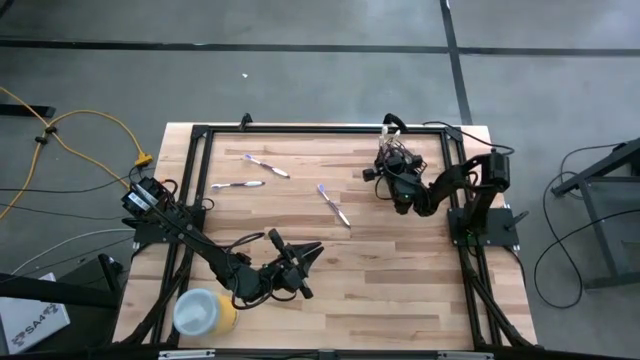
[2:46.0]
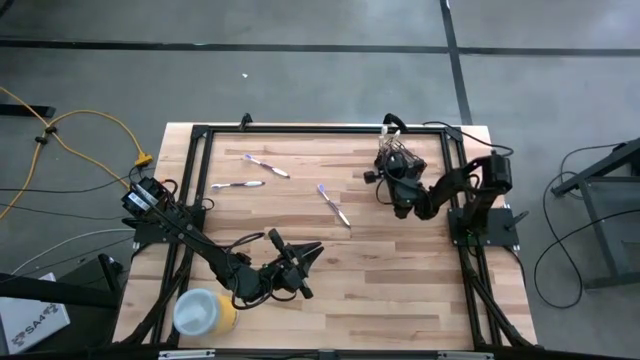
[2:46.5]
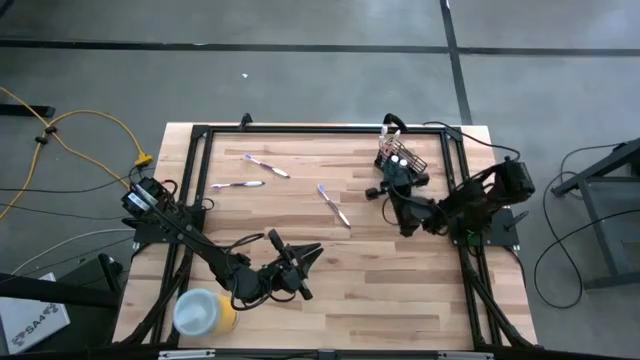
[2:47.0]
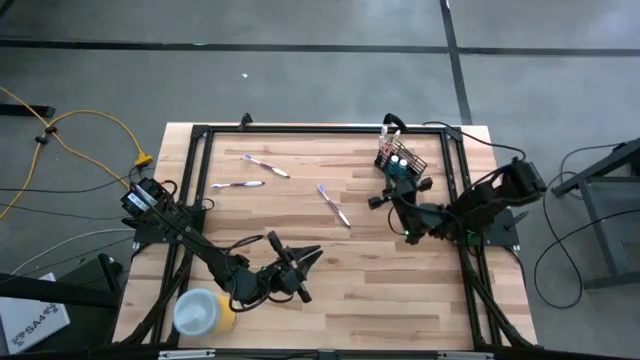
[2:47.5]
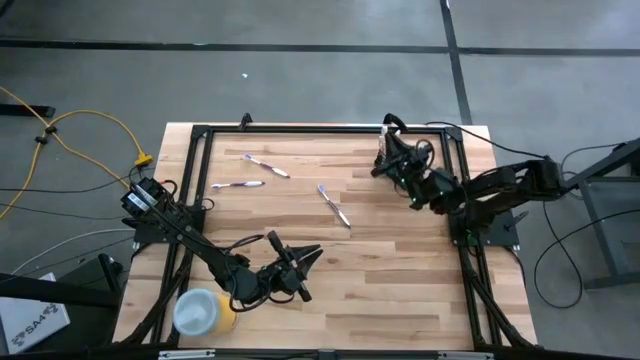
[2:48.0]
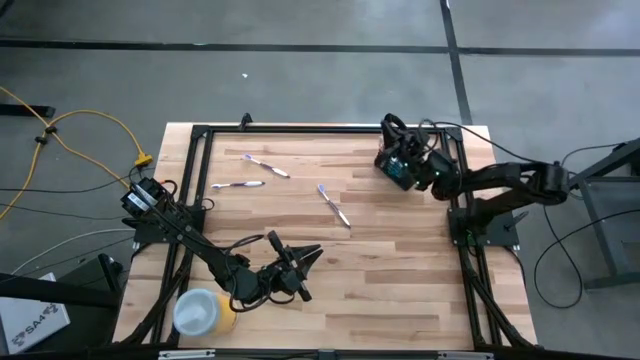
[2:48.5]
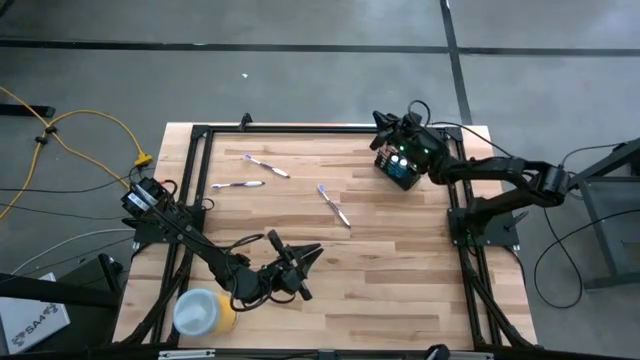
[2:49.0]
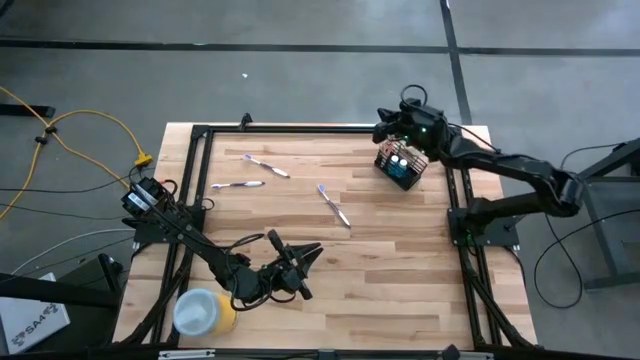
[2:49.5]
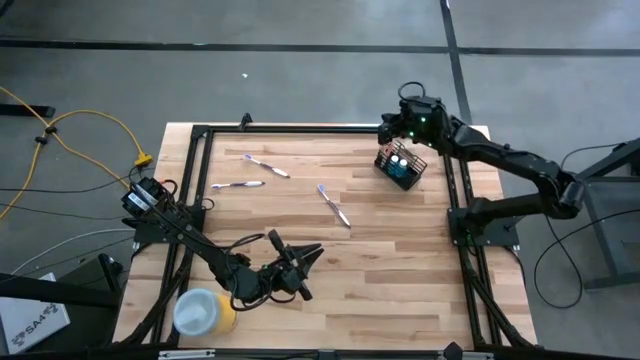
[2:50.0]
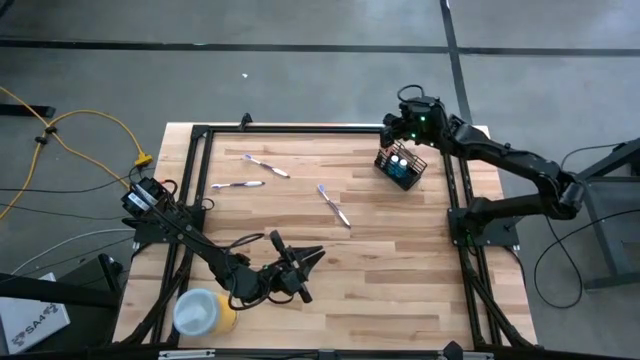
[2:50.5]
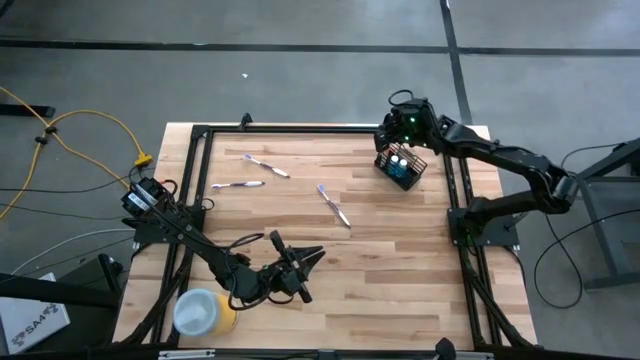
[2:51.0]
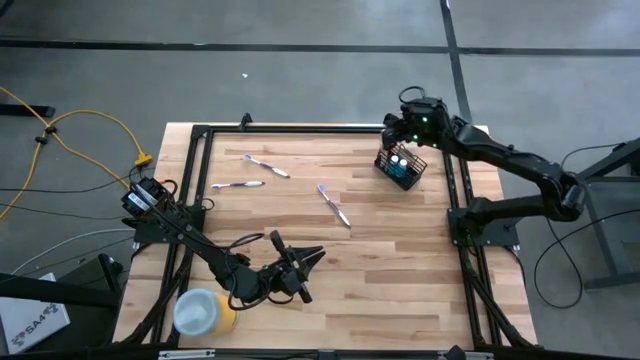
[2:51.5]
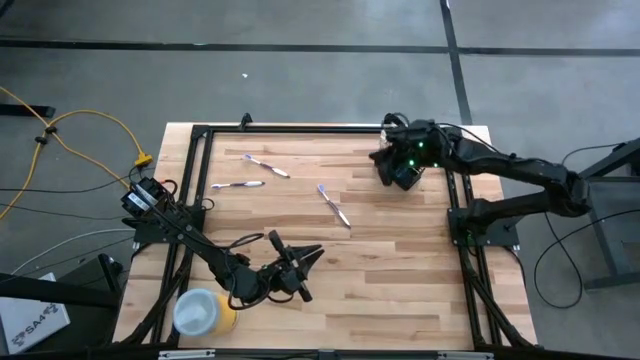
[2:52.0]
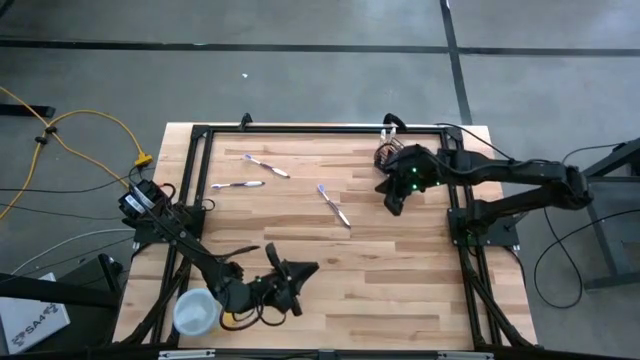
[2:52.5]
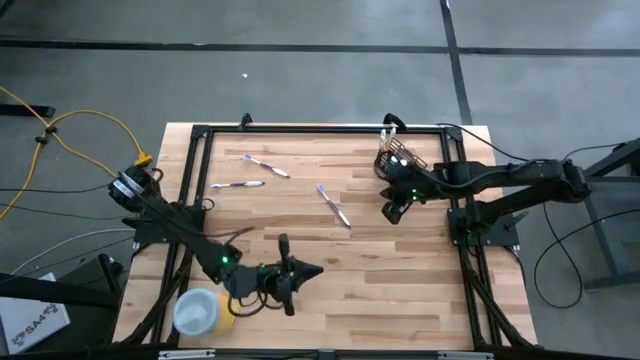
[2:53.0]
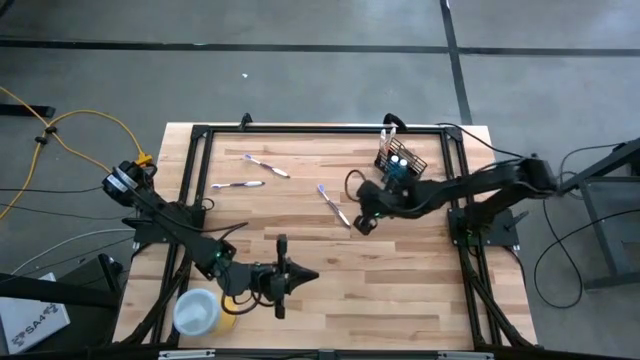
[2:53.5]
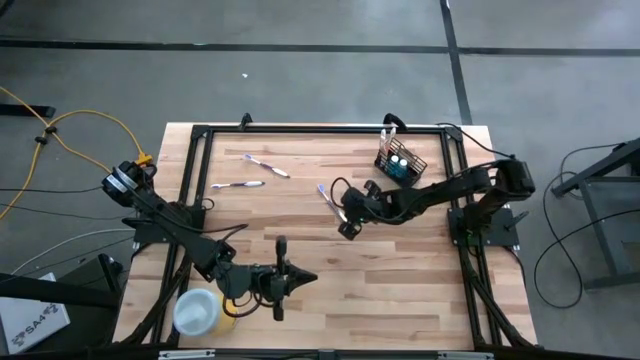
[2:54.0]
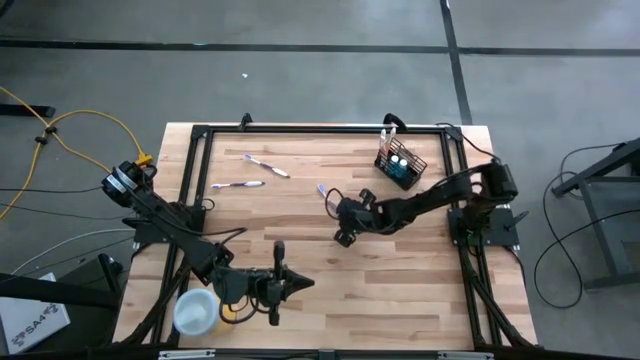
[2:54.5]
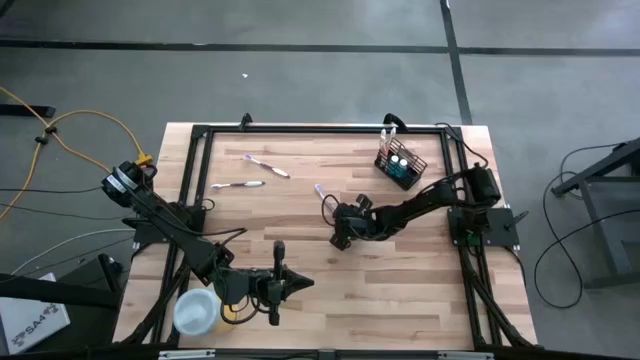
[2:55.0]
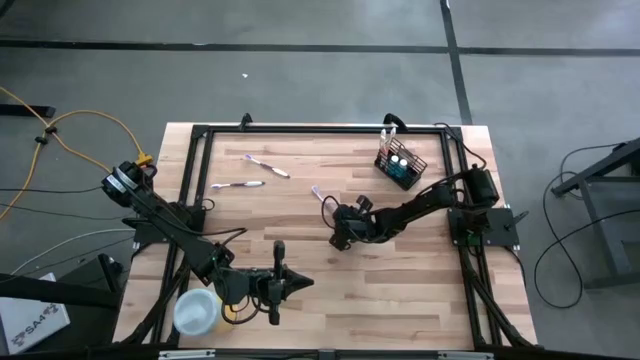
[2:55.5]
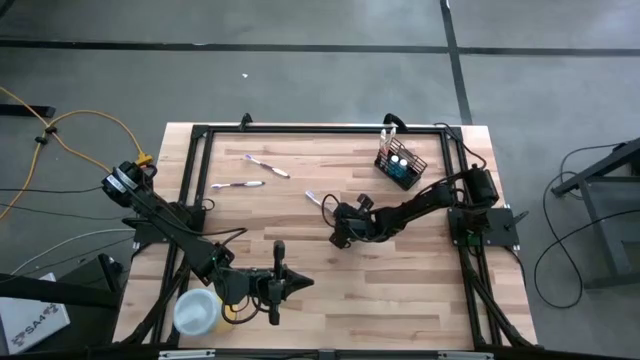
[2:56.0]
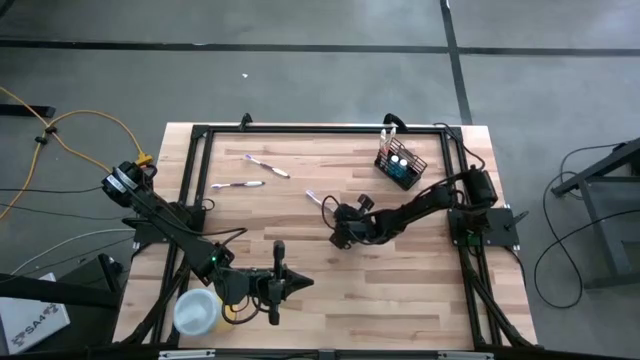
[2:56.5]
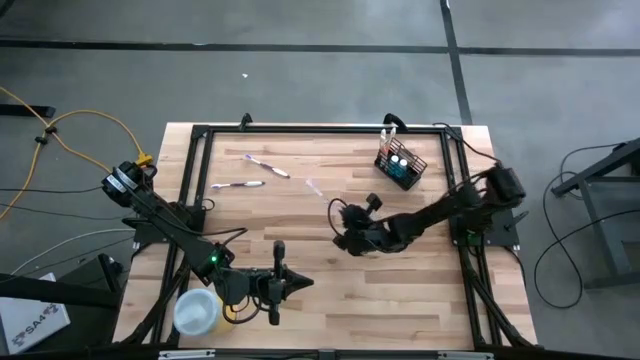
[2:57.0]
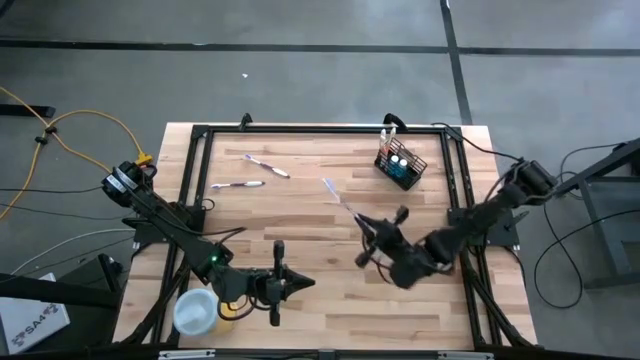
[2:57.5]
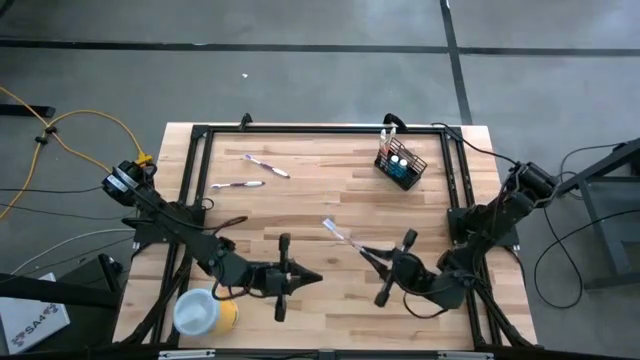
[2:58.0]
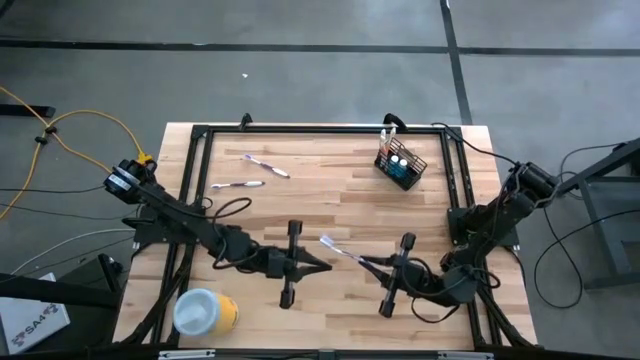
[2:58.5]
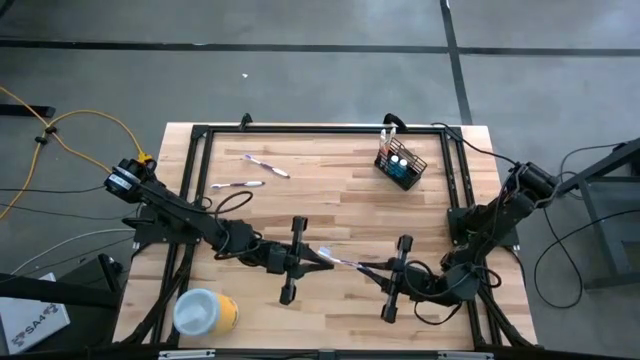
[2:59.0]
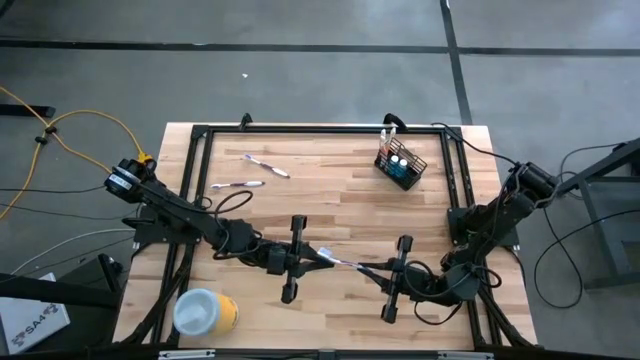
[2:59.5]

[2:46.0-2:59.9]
Task: Pick & Place toothbrushing station
Put the bottom right purple toothbrush into the right of the black mesh organizer
